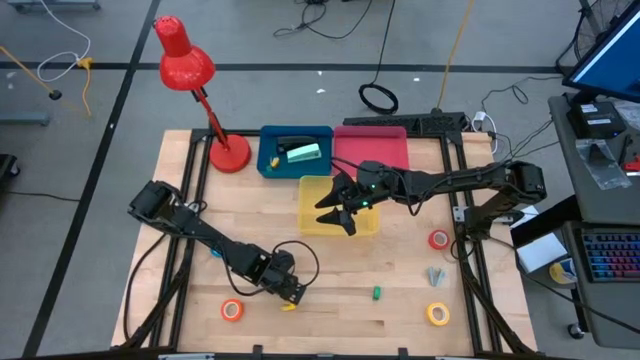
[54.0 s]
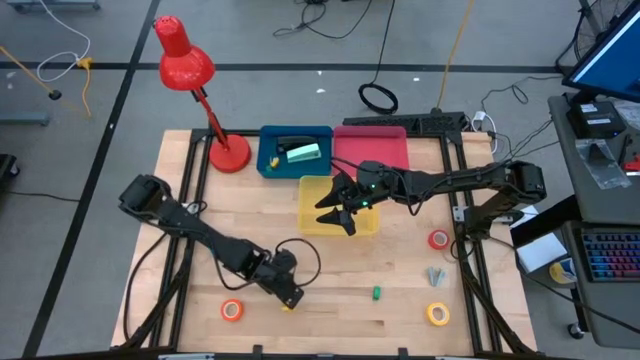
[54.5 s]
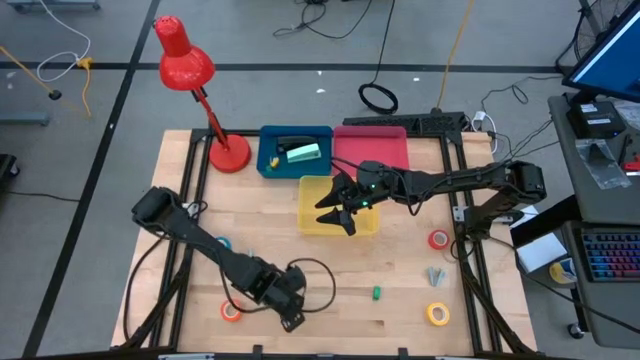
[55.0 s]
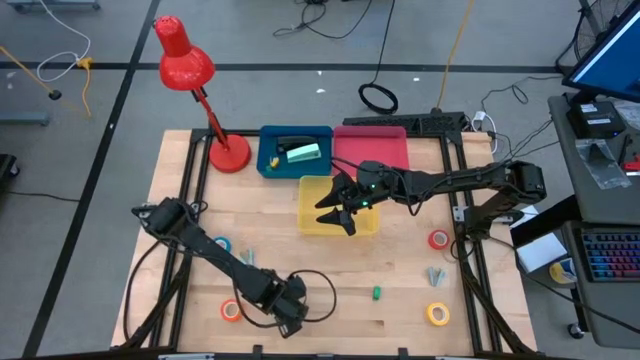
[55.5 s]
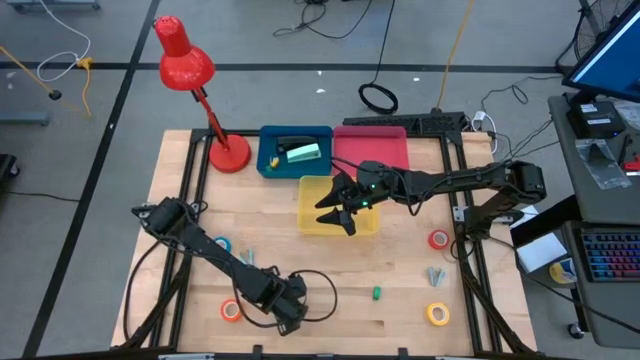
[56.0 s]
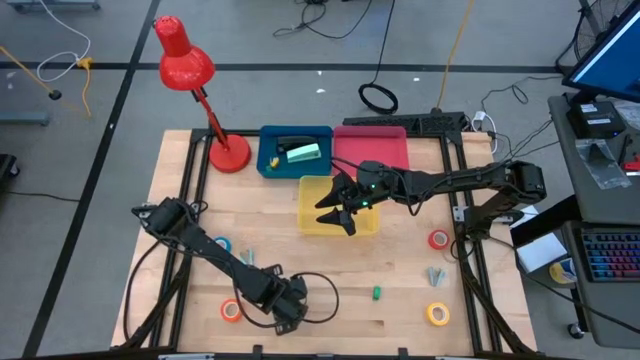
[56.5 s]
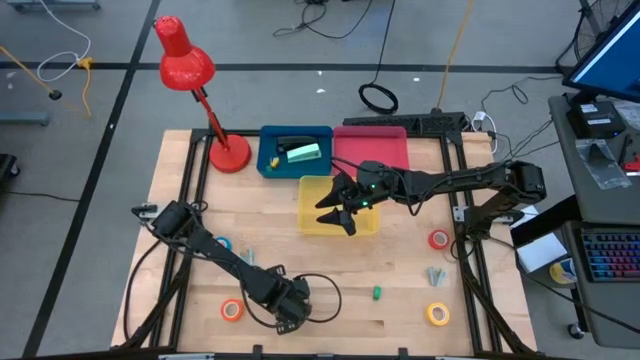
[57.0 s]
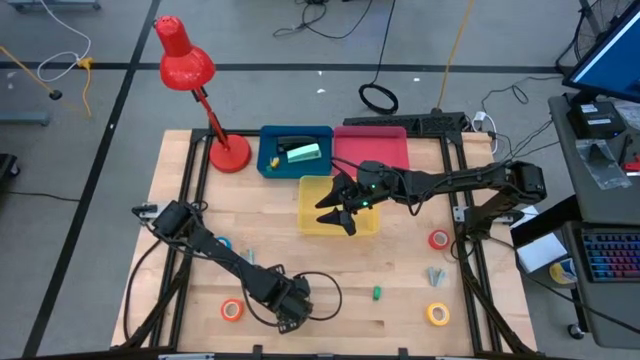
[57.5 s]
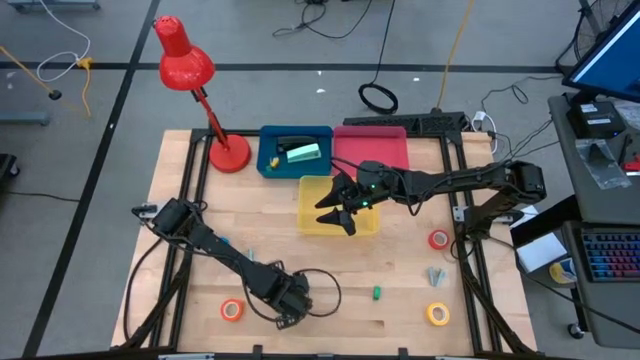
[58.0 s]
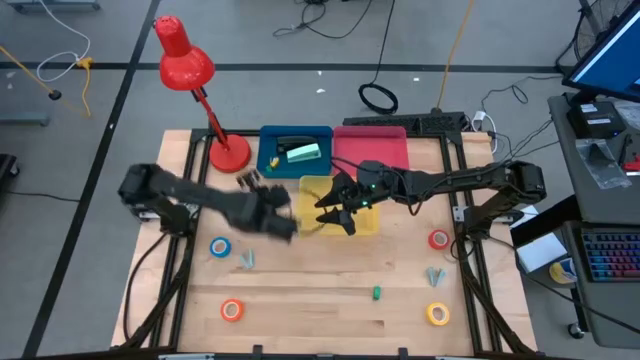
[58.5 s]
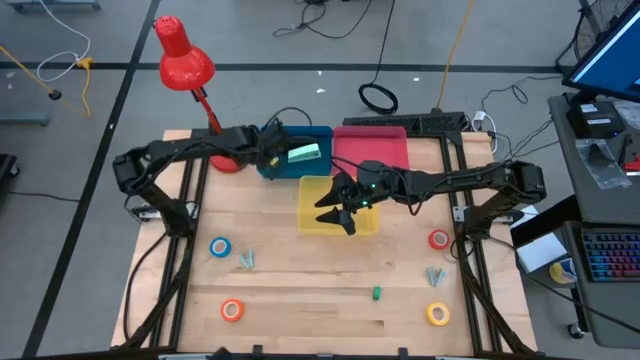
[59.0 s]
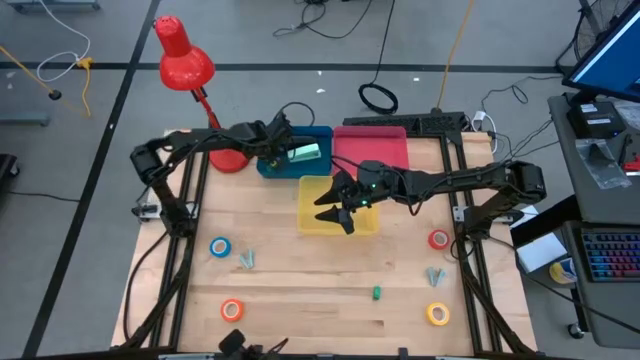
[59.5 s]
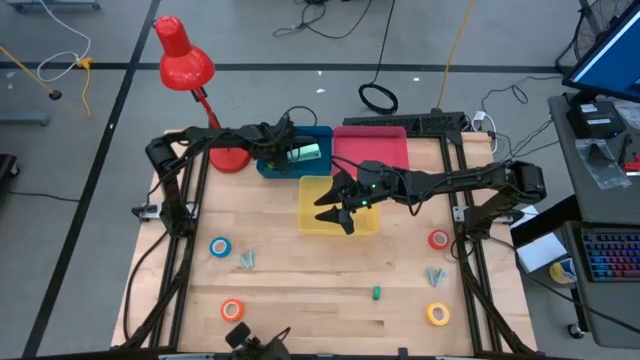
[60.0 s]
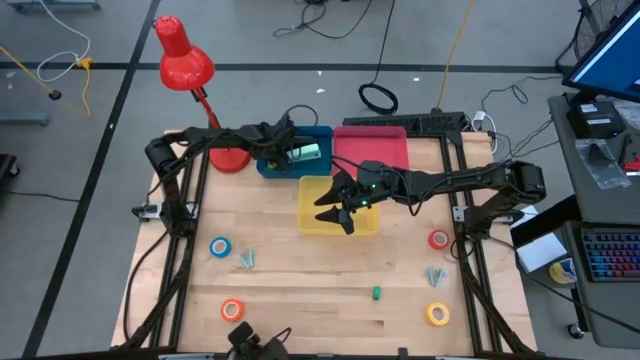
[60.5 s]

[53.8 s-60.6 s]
Task: Pick and place Stapler, Stapler remover, tape
Put the yellow small stapler into the blue bin

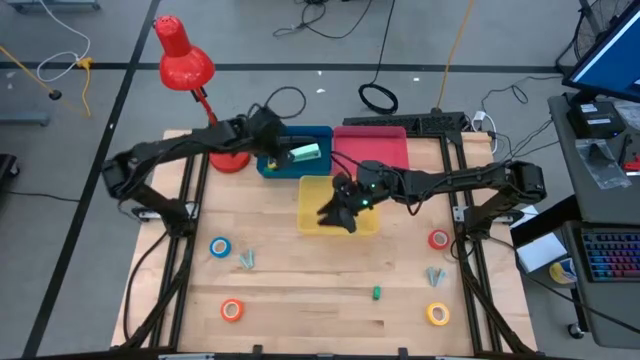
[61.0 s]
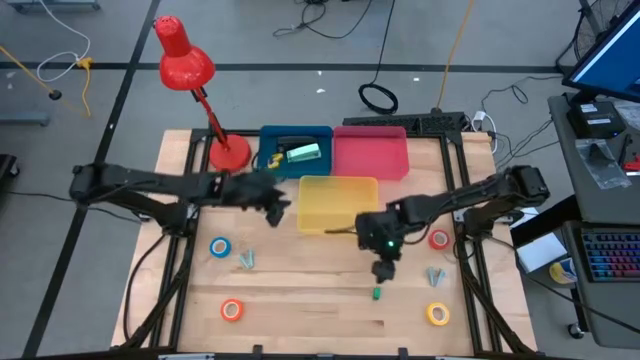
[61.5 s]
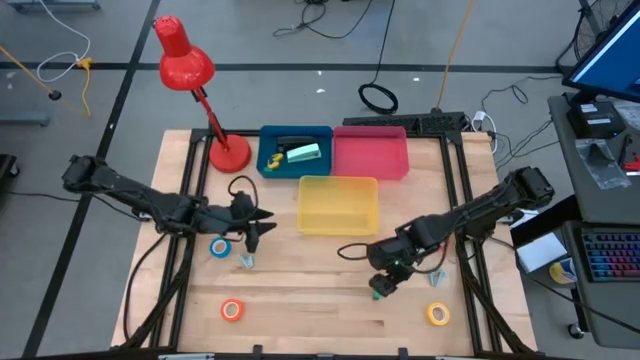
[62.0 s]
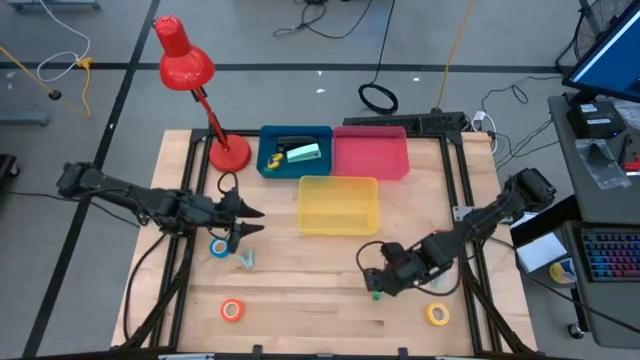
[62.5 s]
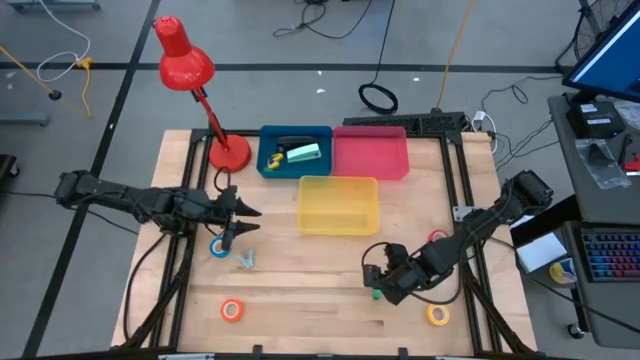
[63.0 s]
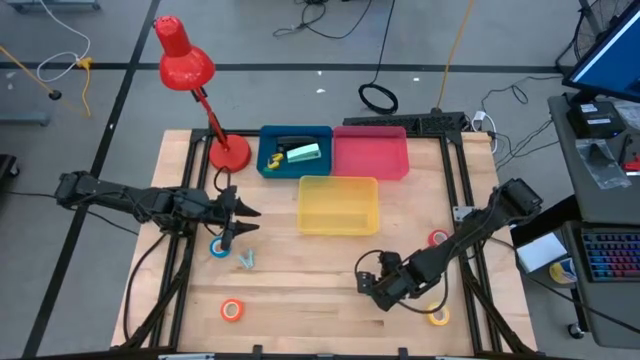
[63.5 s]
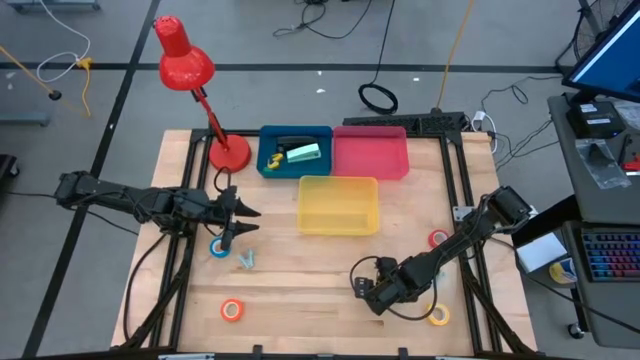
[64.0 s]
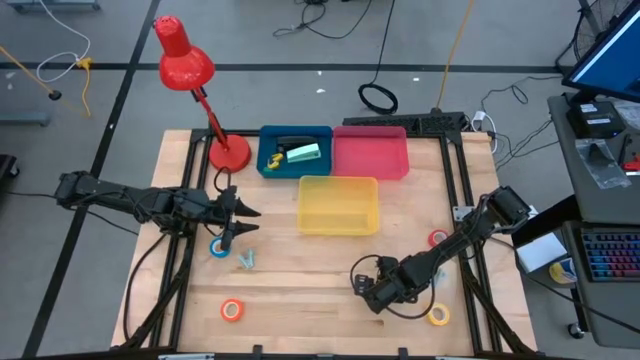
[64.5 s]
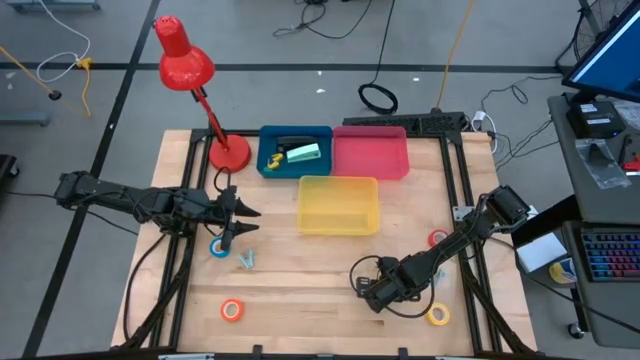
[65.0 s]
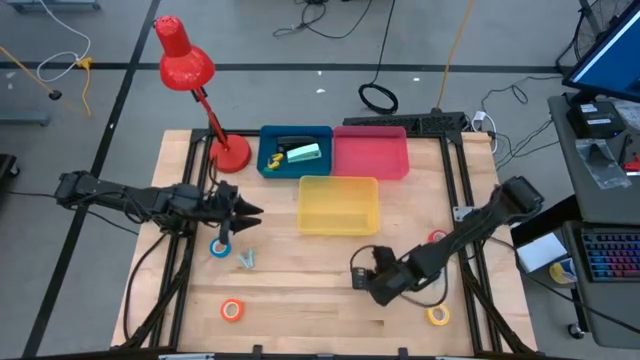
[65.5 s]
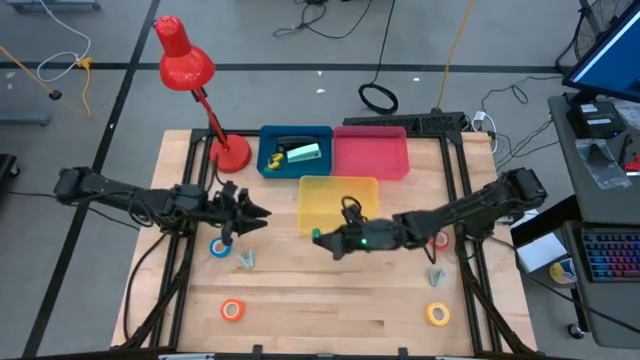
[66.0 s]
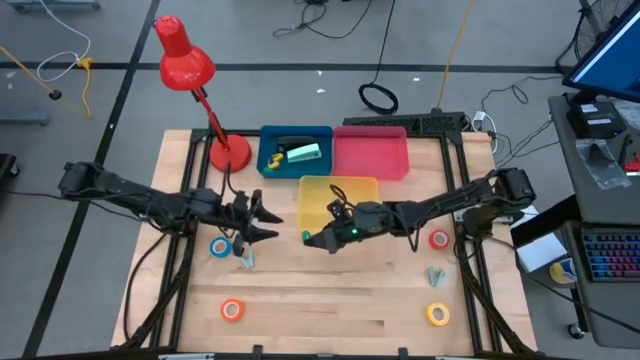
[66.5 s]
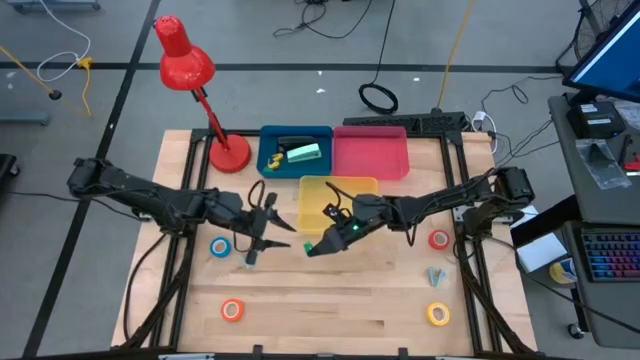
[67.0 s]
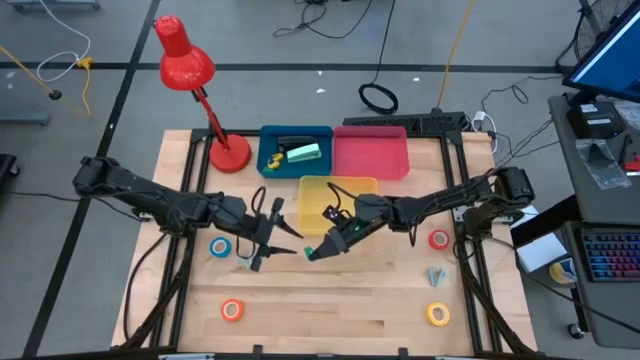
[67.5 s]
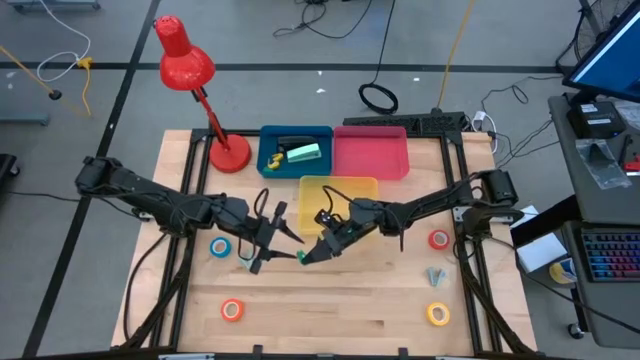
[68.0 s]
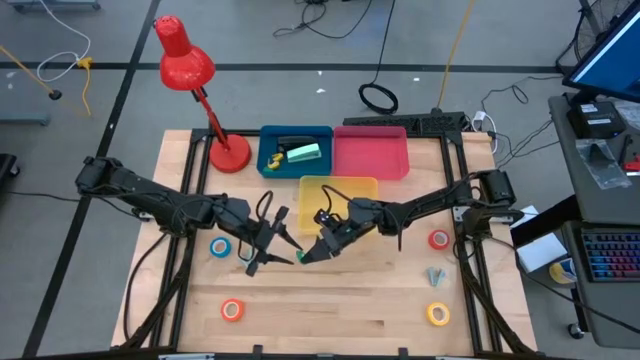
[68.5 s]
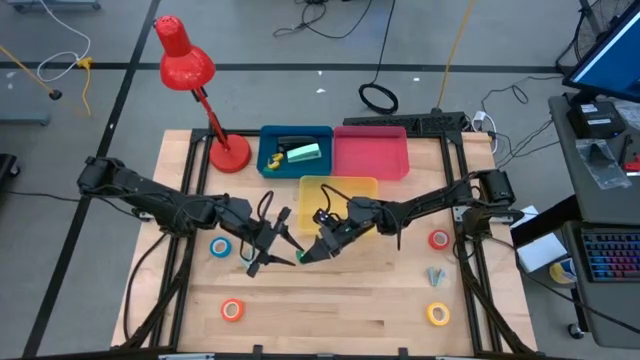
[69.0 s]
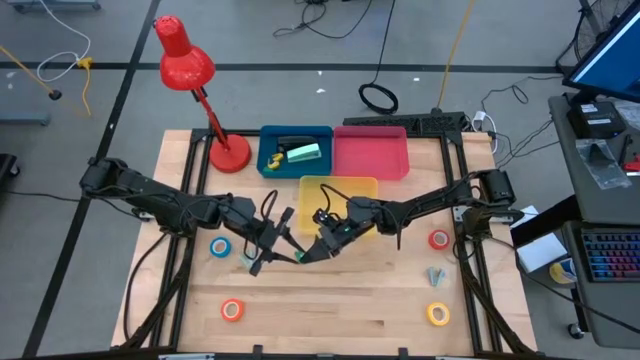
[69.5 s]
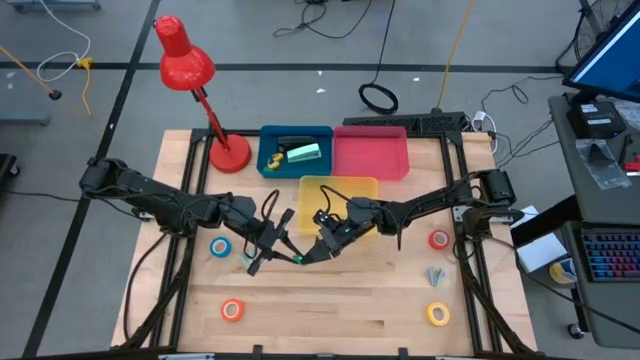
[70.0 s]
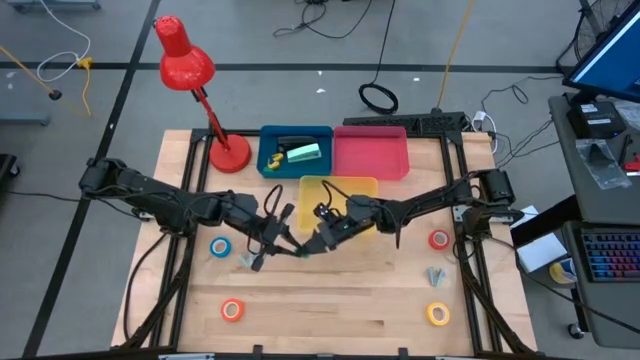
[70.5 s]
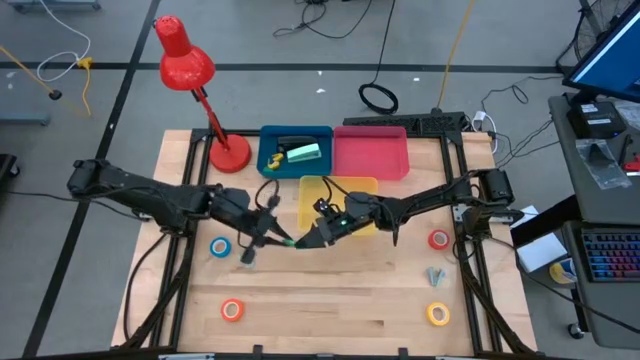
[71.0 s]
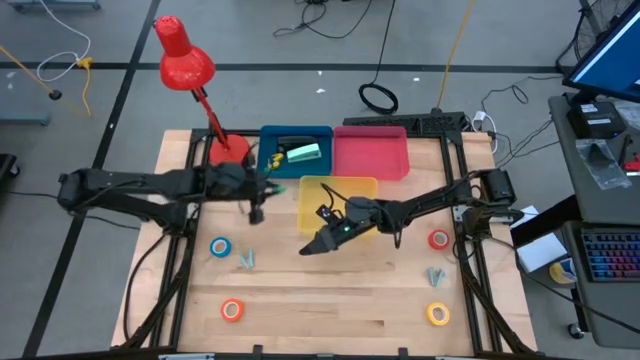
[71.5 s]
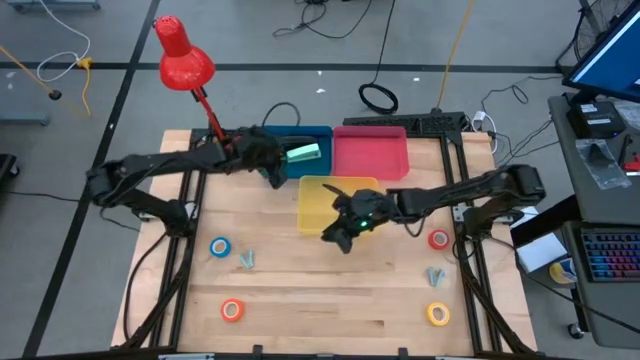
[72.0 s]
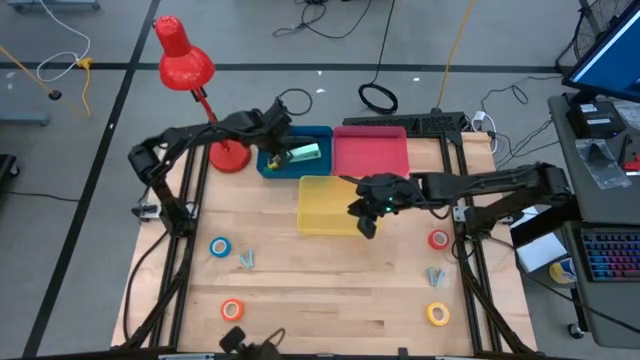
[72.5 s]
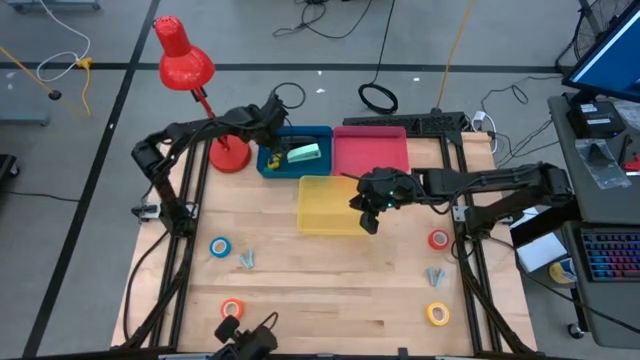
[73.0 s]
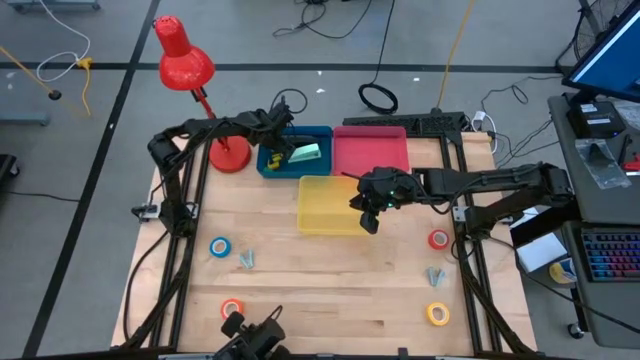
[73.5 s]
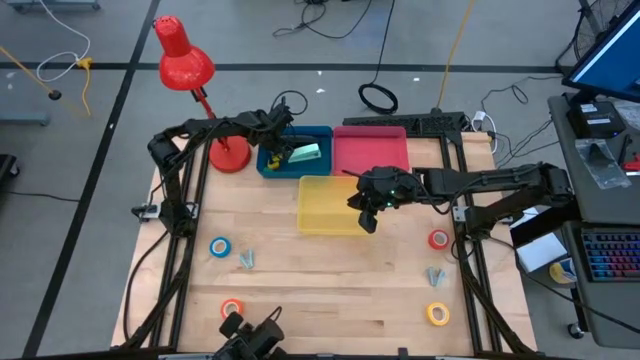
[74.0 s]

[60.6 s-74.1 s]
Put the green small stapler into the blue bin

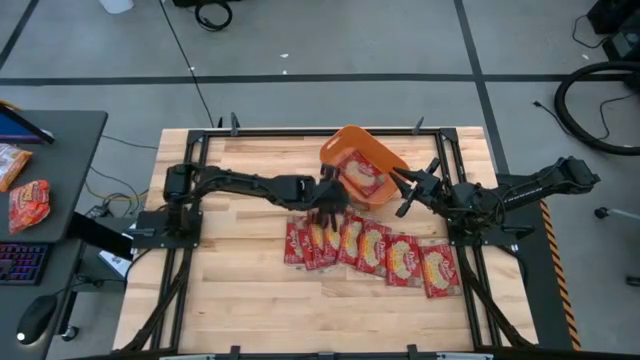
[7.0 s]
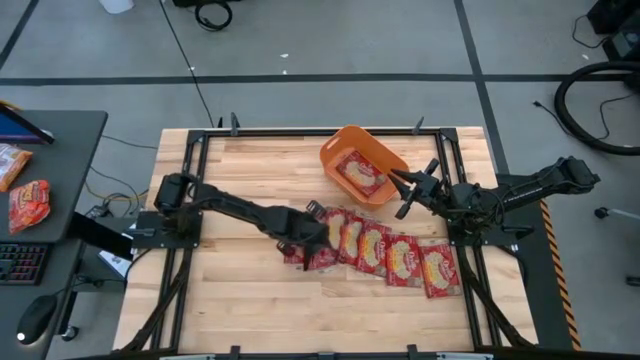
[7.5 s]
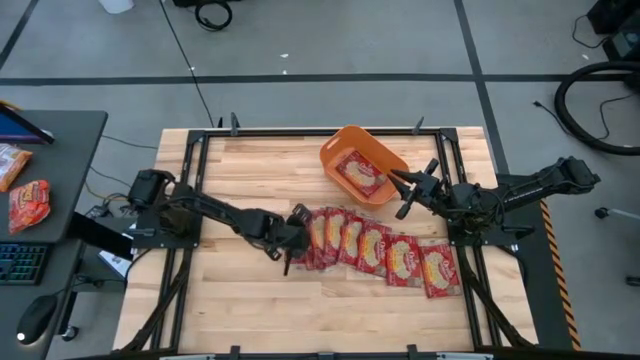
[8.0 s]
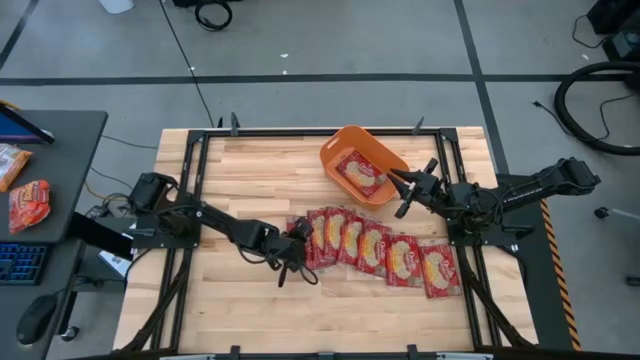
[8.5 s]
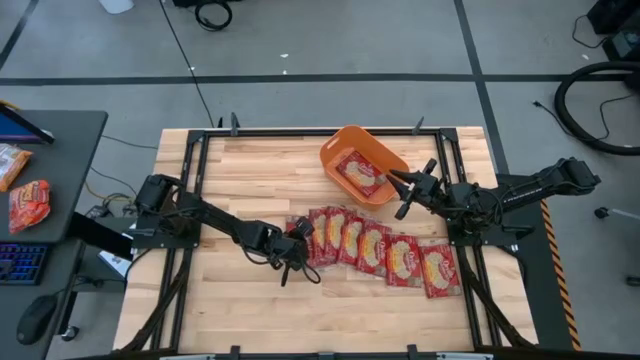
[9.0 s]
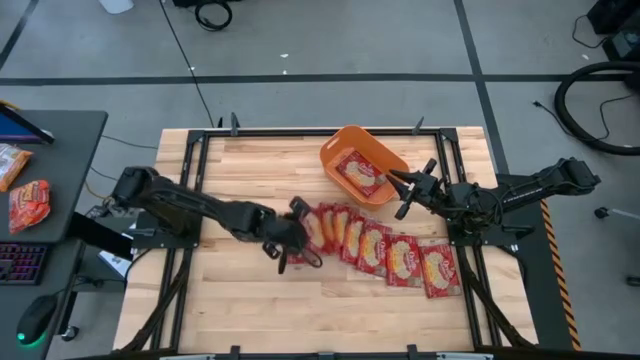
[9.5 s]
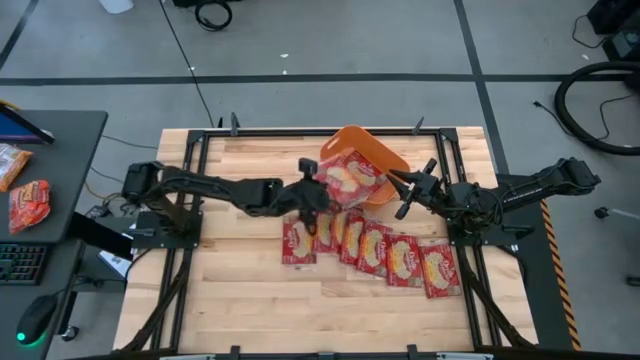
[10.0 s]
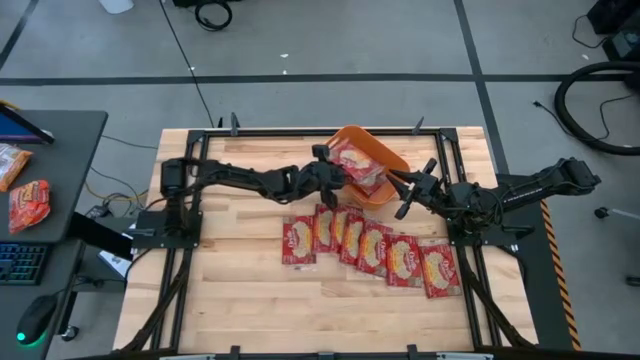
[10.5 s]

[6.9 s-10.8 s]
Task: Sort popcorn bags into baskets
Put the popcorn bag into the bin
